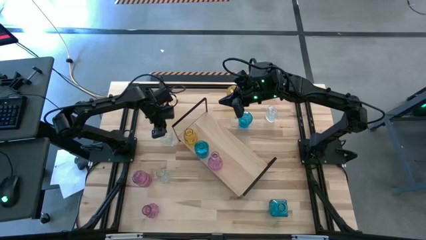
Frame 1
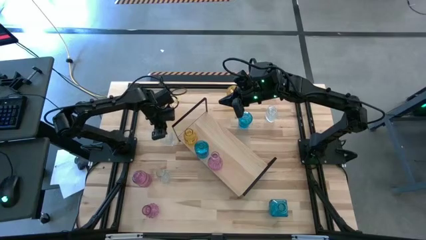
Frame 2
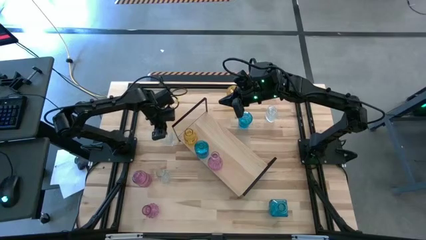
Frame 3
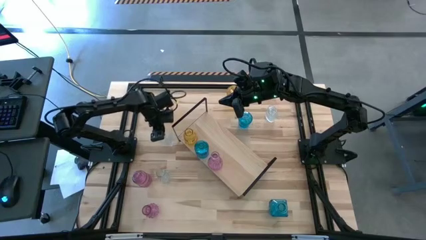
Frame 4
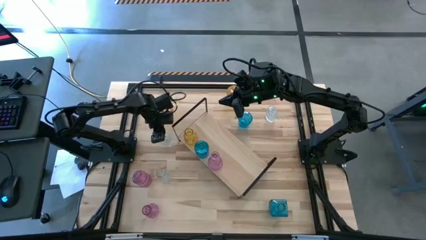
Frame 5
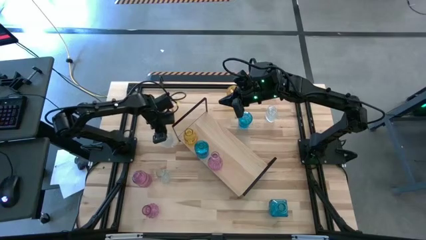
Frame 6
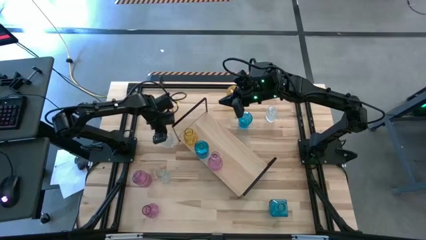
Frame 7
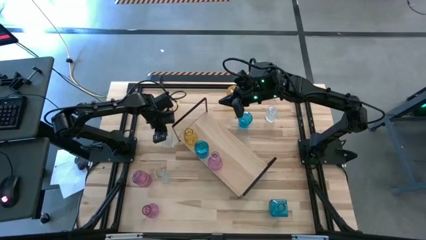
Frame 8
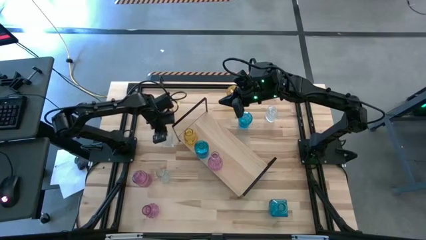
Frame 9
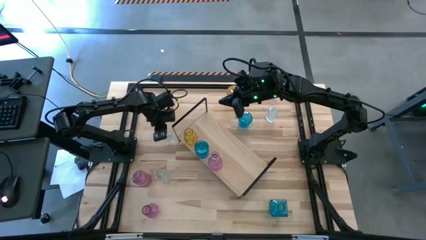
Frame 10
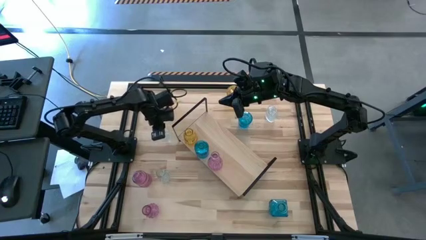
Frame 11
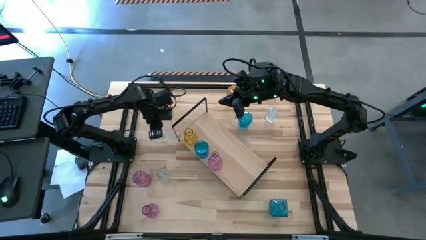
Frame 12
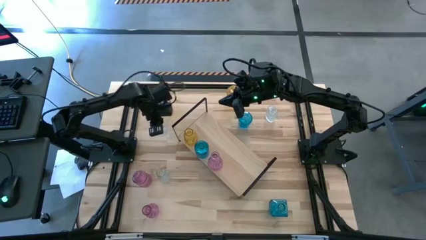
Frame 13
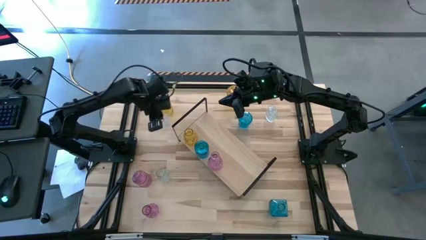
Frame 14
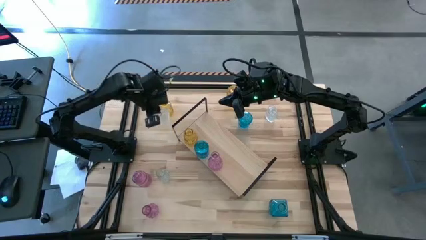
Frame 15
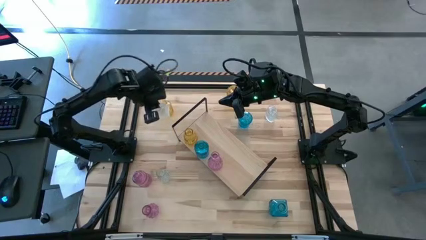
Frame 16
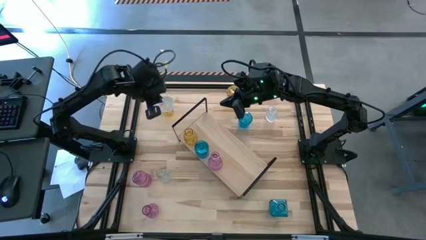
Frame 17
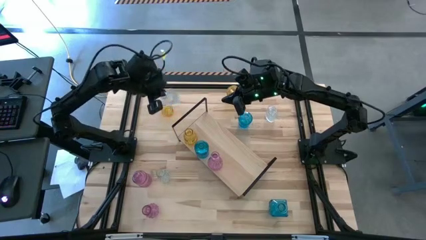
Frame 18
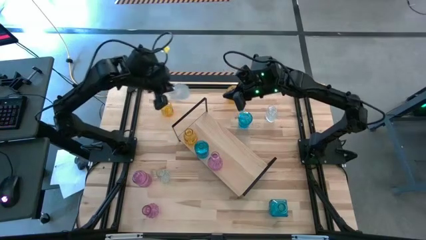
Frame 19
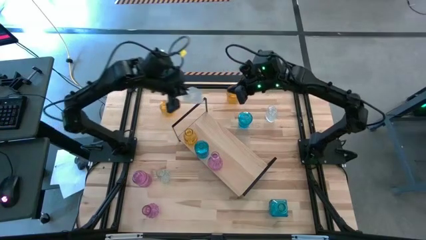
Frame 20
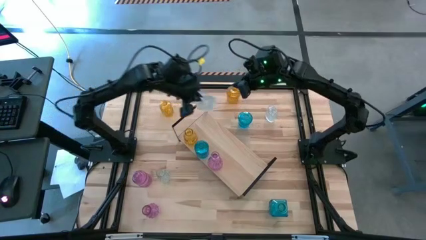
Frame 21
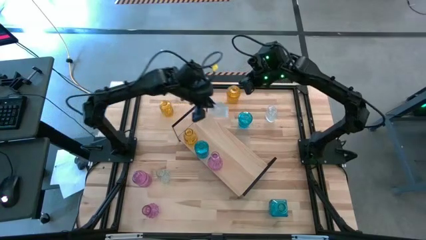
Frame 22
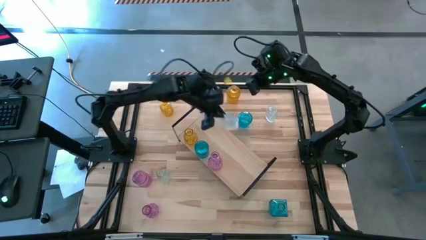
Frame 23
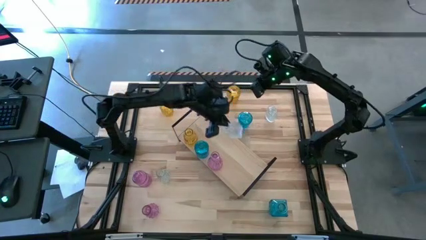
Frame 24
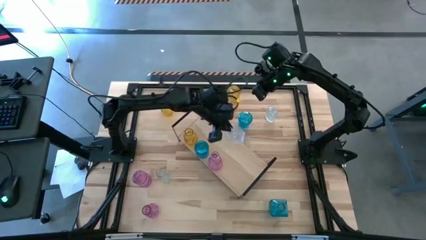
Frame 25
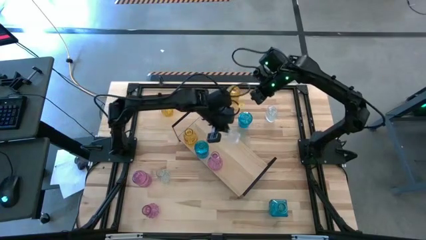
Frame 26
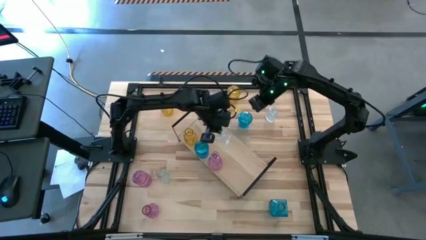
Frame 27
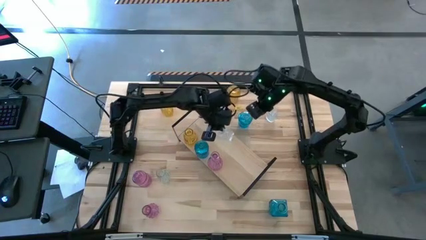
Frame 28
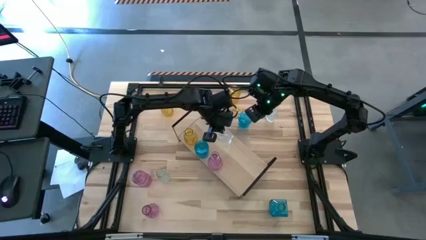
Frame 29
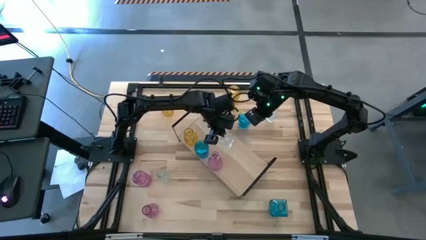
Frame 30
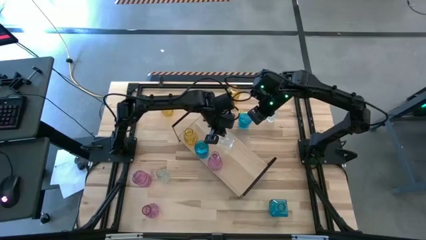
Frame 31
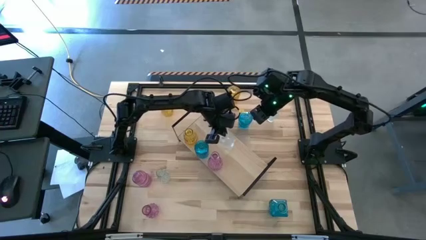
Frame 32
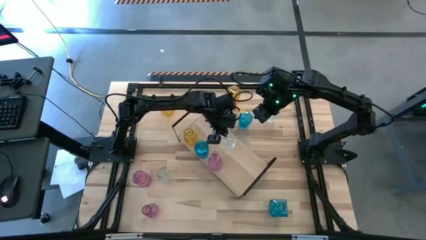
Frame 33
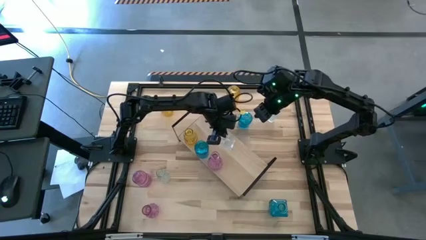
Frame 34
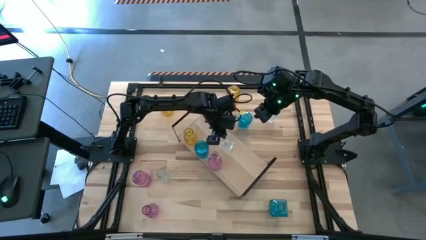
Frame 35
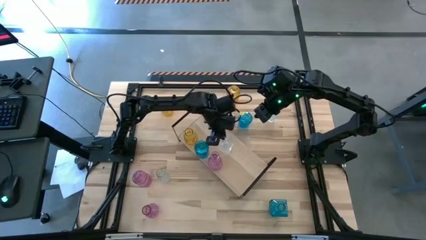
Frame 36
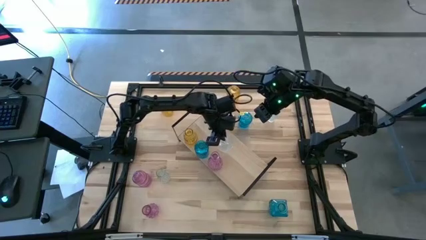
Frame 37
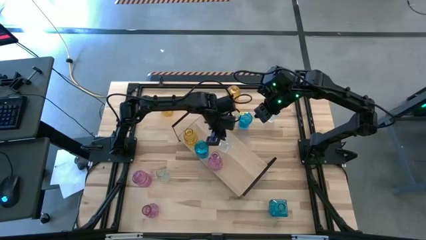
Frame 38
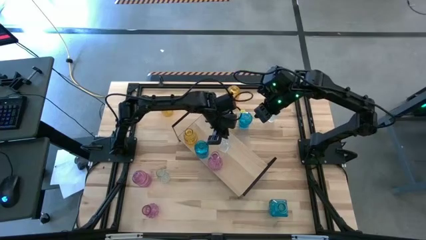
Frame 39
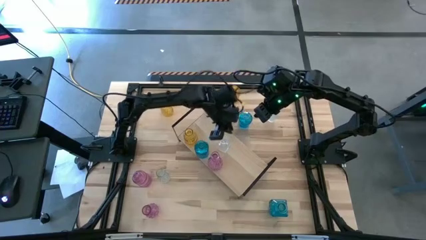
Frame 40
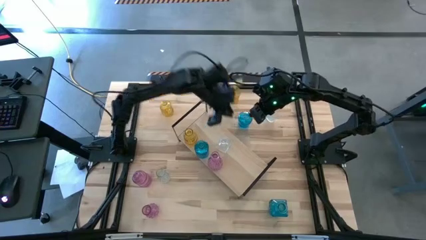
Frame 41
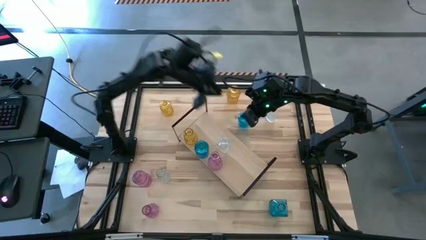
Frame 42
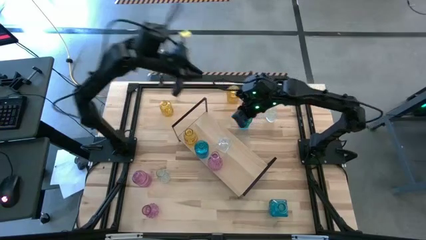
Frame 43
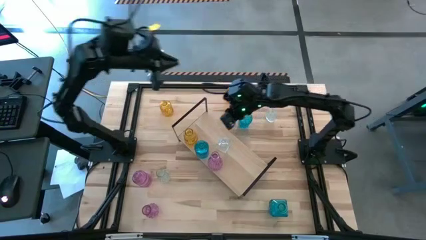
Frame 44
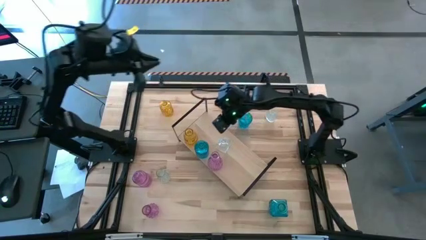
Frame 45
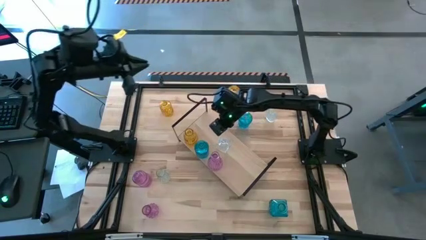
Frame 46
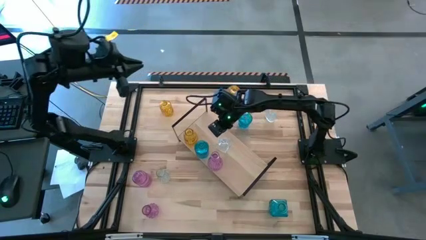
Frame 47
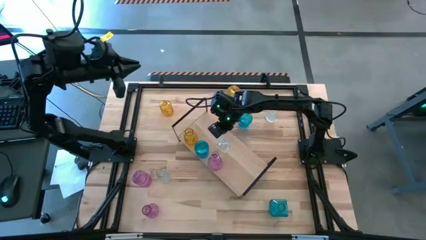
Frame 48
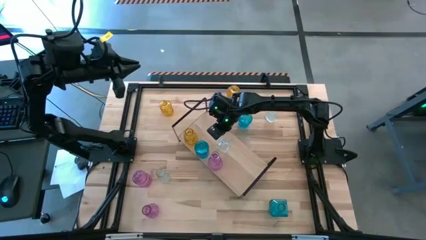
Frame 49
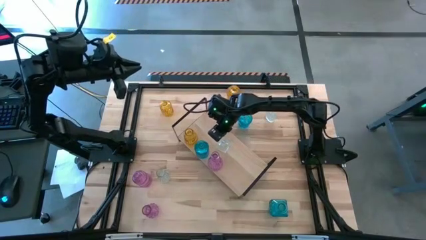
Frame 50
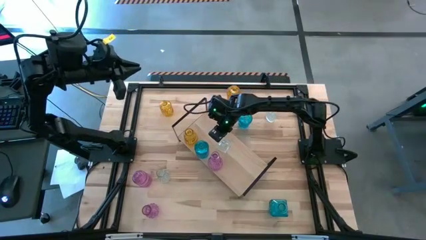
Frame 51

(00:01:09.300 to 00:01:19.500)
Task: sort vases onto shelf
Put the top left crystal vase on the shelf
